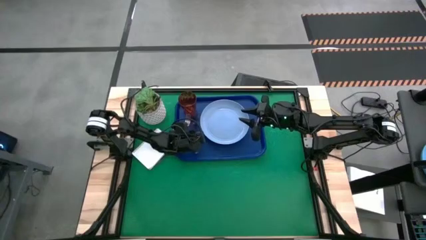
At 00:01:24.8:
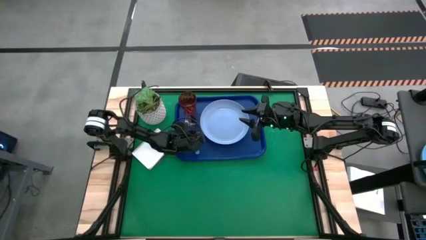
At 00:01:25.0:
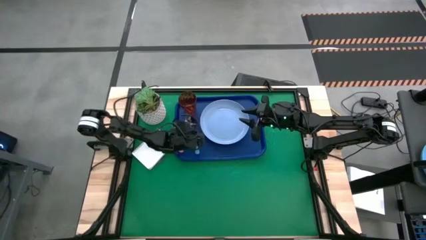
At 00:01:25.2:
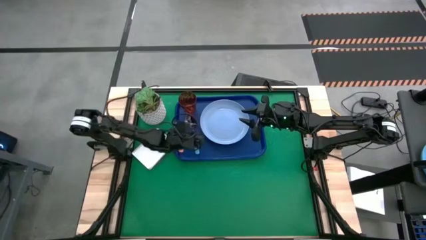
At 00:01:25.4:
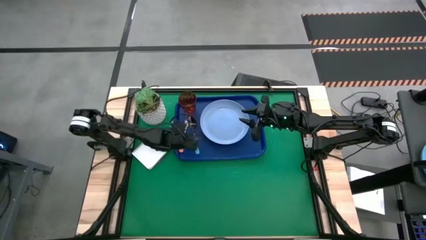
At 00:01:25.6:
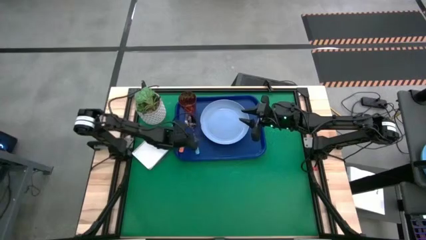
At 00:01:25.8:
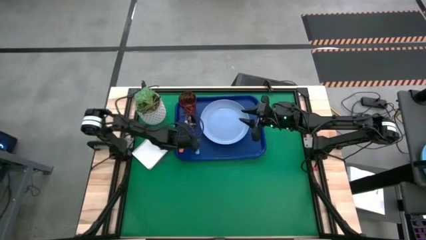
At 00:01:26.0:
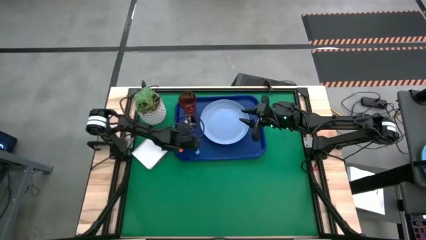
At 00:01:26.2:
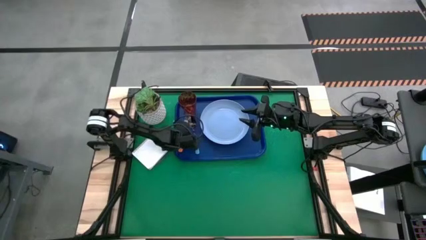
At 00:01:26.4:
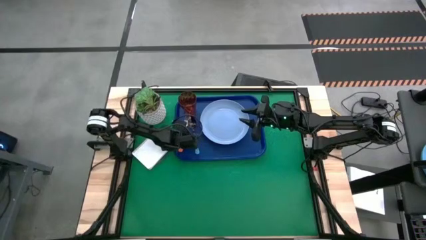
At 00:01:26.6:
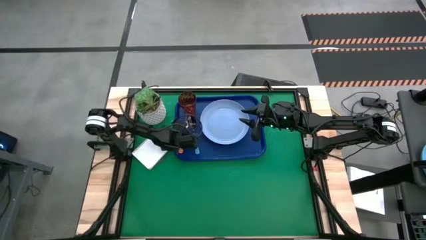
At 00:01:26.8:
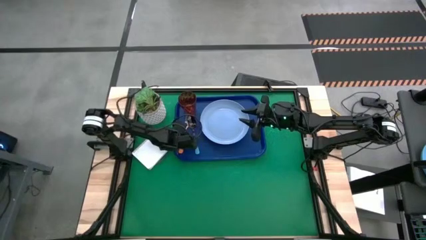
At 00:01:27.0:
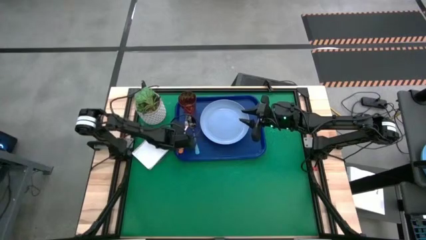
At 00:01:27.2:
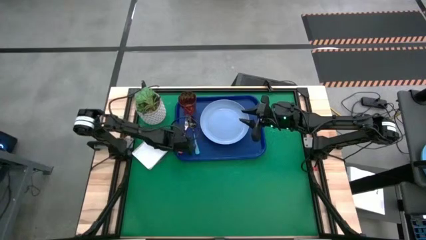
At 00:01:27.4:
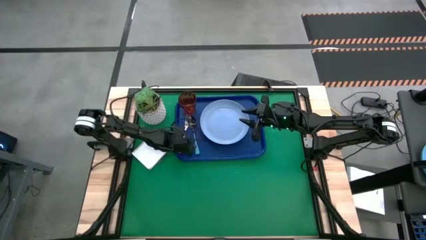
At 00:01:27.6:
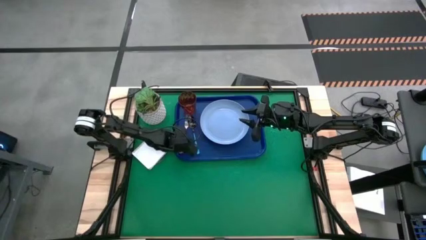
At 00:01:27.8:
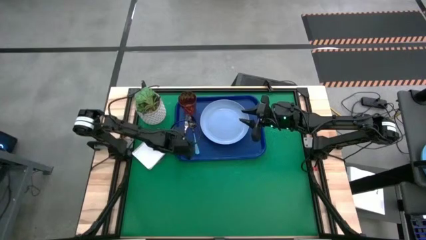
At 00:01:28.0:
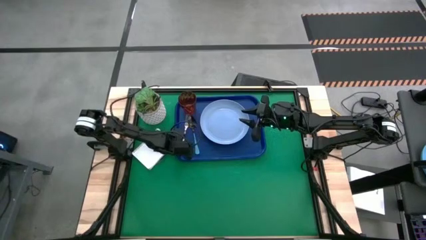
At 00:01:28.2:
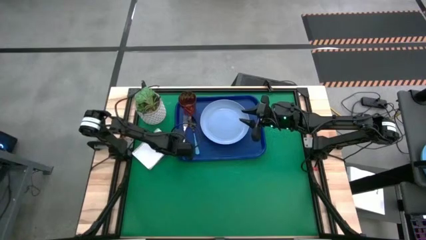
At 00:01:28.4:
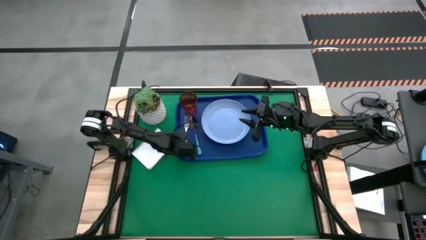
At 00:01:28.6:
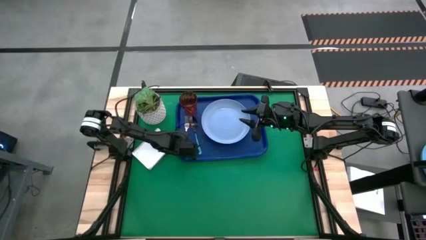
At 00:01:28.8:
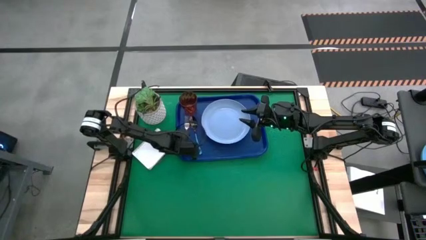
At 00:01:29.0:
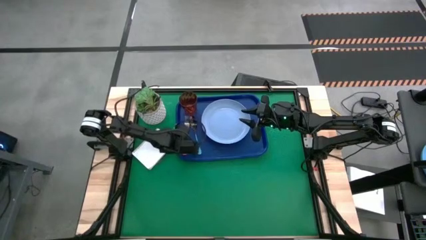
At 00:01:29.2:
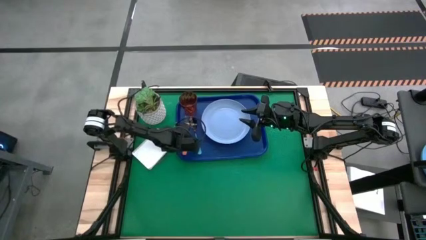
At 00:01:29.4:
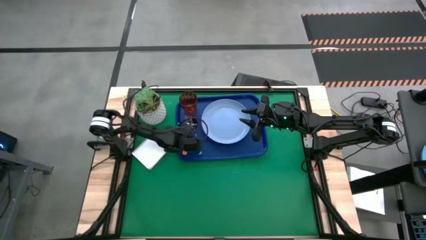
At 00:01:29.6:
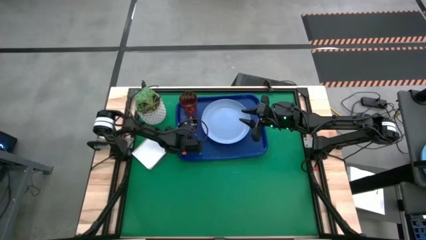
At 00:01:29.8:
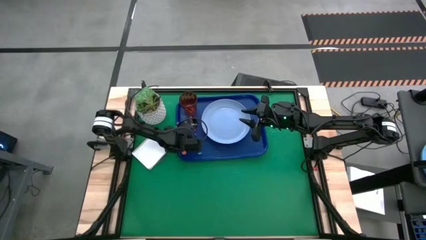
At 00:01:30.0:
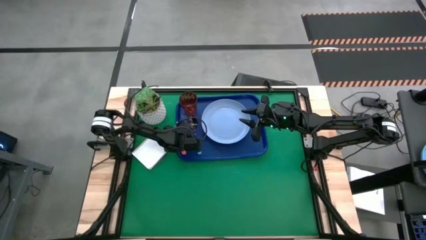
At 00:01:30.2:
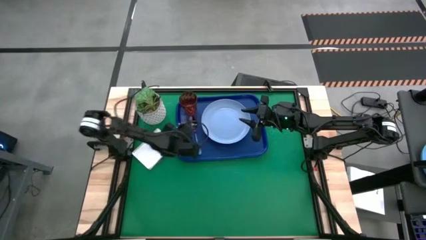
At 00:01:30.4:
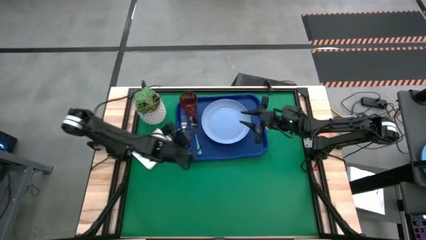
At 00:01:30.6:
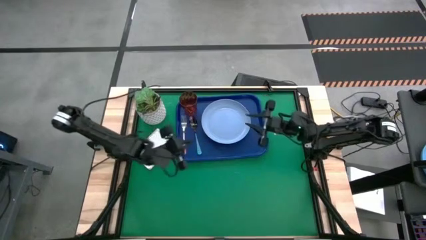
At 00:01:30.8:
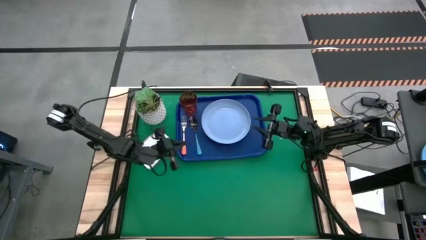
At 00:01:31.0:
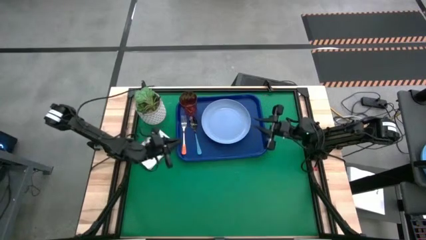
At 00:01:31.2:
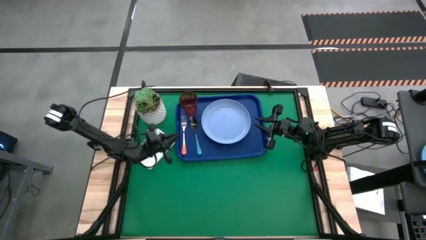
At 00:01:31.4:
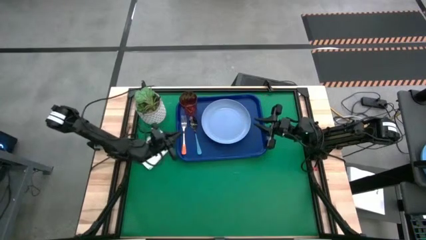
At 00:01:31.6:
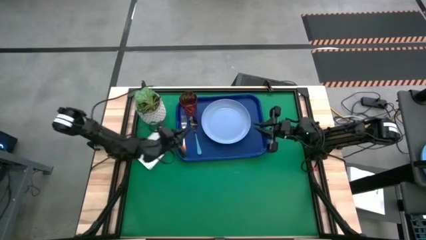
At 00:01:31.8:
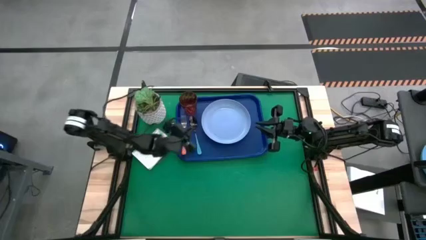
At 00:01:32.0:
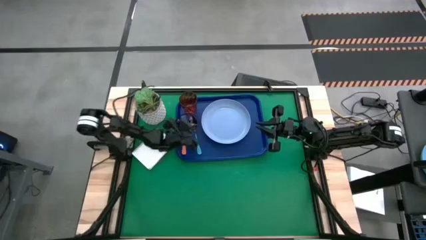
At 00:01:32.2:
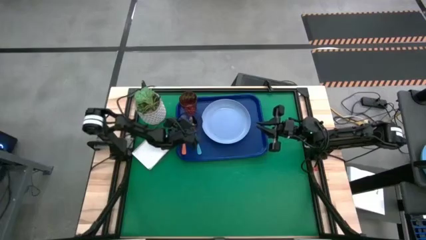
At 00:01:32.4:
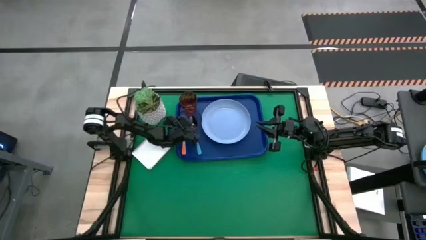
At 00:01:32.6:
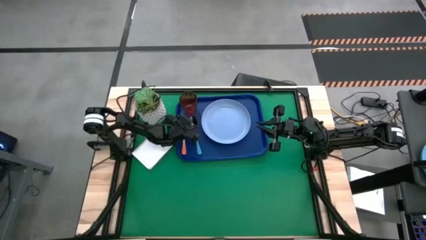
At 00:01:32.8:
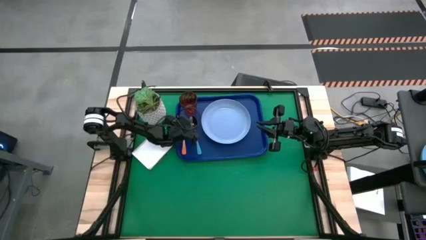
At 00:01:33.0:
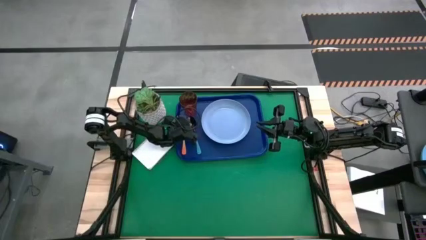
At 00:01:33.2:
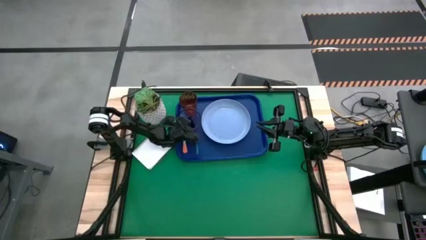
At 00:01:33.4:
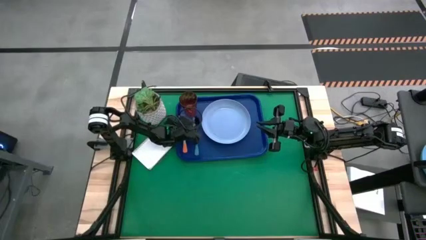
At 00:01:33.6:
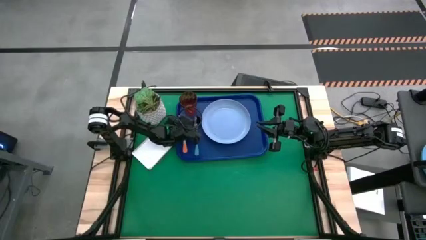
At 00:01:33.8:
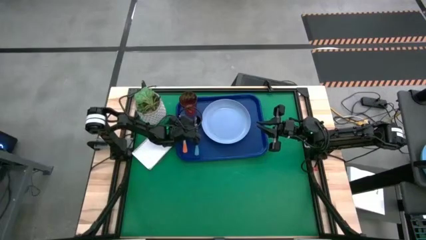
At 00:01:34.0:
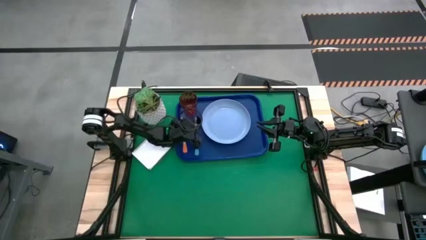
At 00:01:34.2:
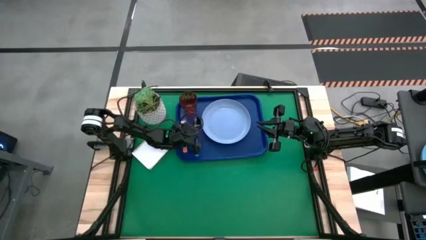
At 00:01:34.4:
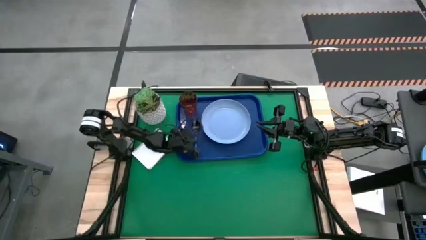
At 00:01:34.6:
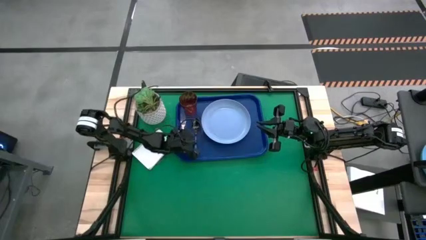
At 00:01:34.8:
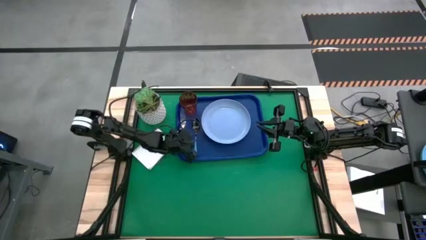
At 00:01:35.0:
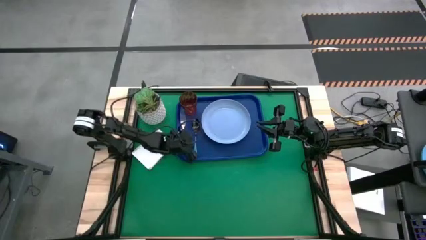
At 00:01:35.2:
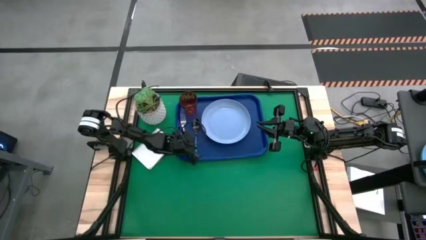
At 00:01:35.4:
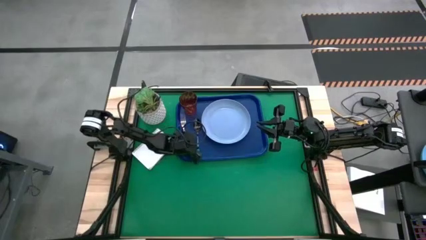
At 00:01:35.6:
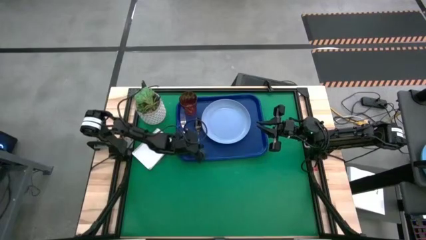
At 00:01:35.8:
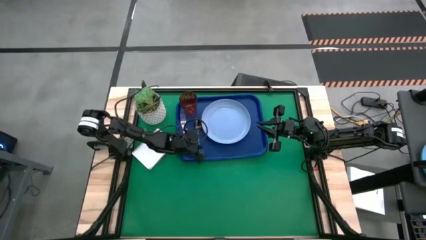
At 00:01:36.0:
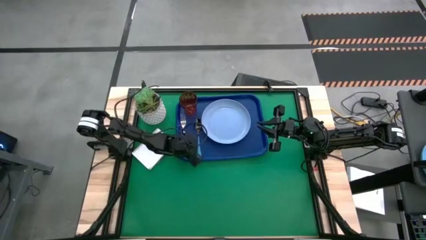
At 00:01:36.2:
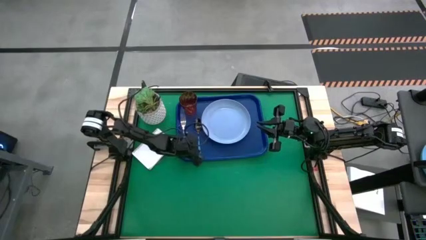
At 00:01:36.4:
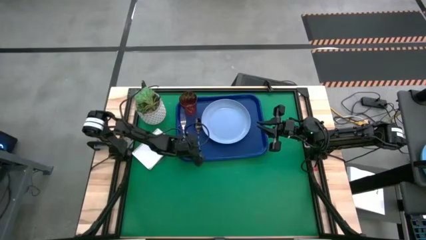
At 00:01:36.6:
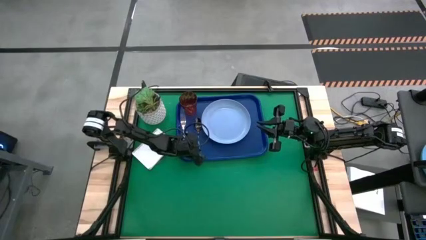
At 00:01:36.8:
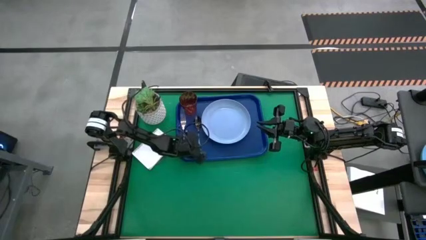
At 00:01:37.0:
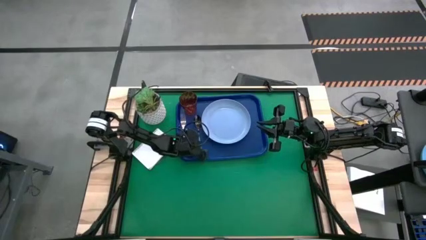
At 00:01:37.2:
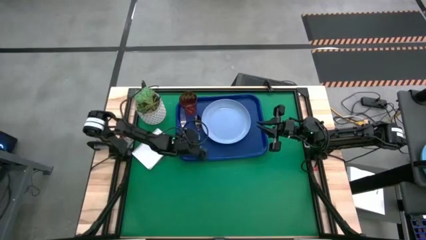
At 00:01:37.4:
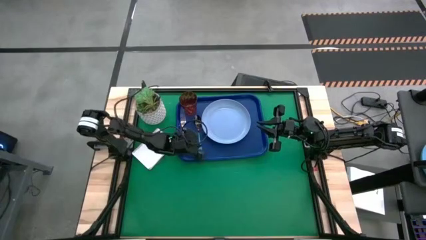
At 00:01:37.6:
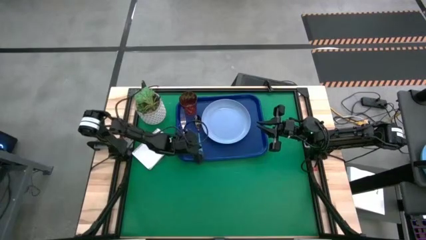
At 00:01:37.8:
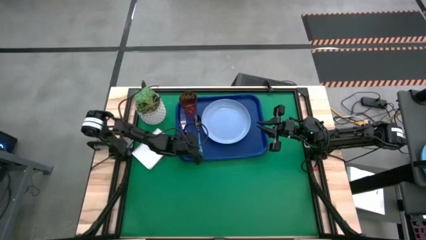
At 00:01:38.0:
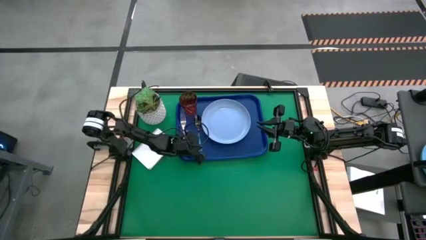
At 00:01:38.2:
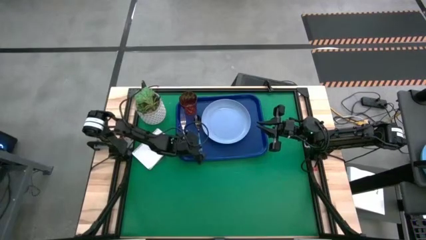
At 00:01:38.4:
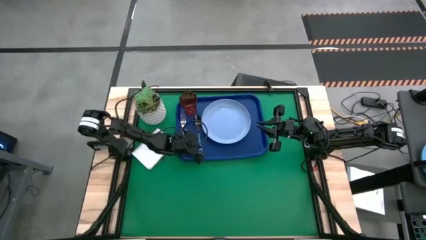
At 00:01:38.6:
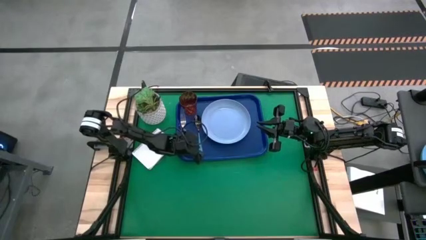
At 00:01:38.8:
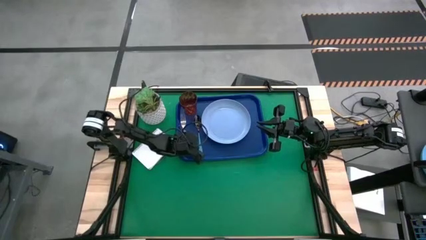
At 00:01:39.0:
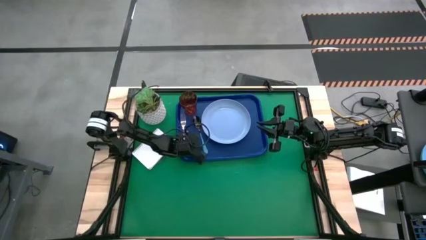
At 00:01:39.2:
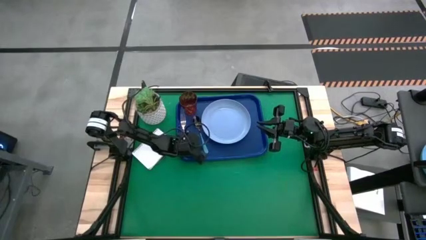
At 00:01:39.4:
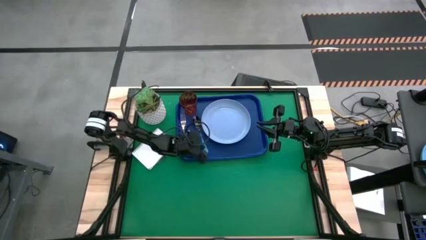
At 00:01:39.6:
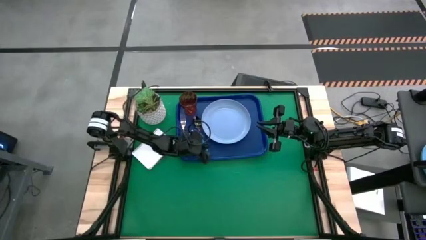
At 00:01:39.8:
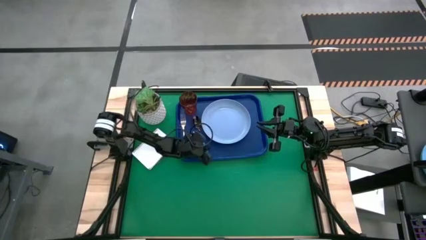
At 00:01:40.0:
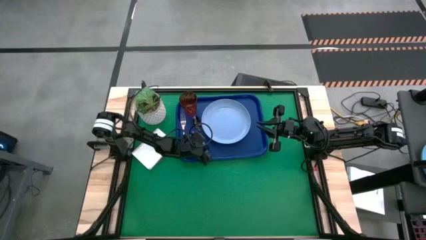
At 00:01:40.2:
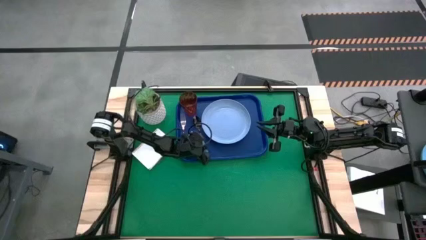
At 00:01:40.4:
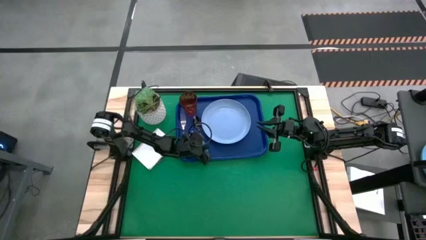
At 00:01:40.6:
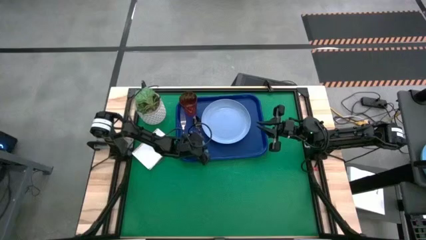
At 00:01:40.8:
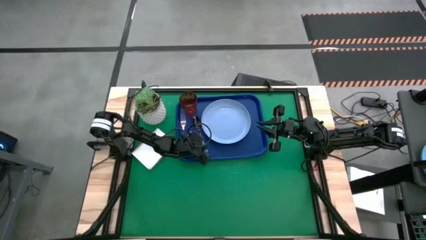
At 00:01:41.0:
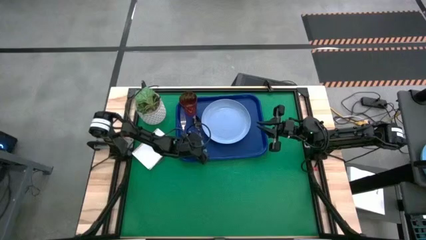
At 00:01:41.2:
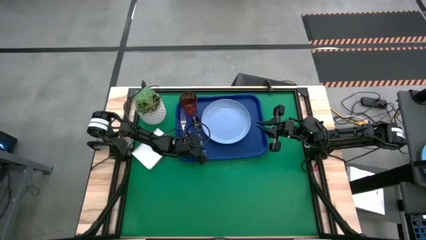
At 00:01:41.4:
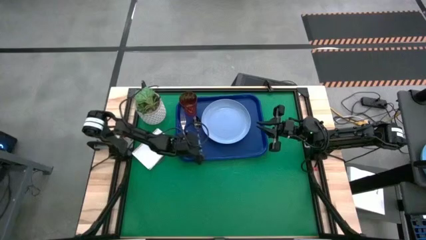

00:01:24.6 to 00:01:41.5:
Task: Pick and place plate/cup/fork/spoon on tray
Adjust the utensils on the tray
